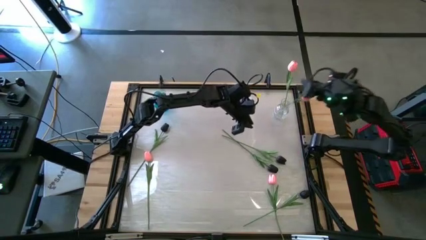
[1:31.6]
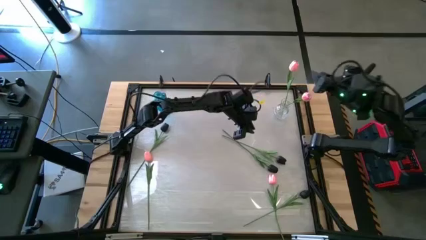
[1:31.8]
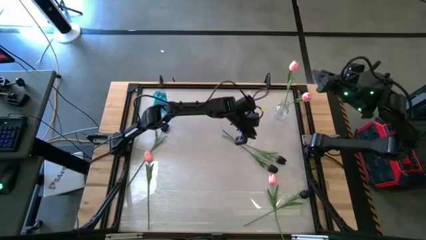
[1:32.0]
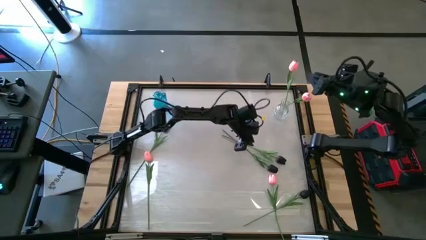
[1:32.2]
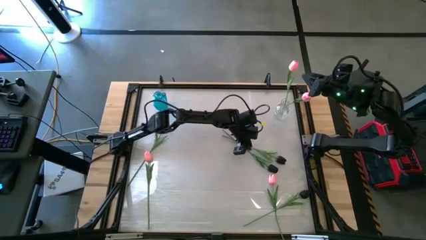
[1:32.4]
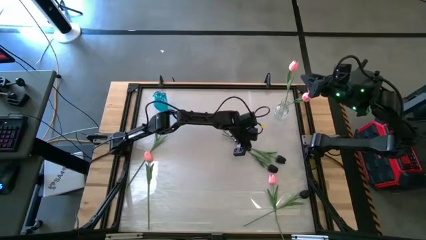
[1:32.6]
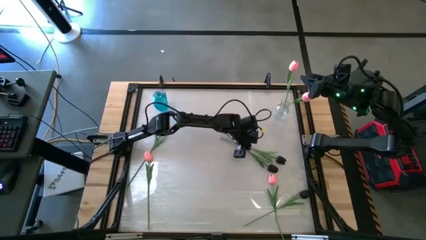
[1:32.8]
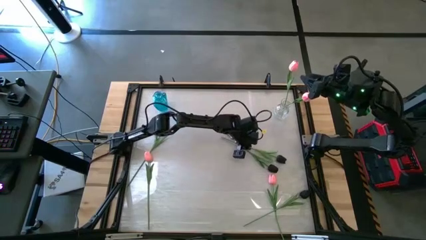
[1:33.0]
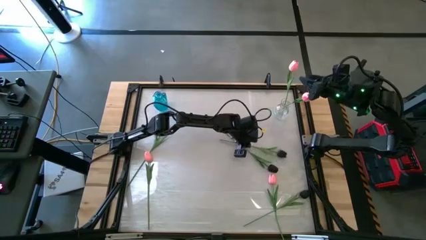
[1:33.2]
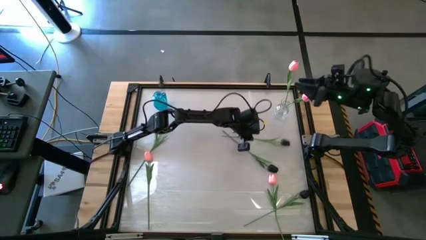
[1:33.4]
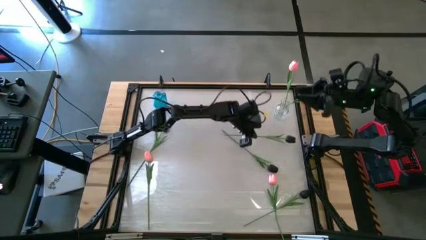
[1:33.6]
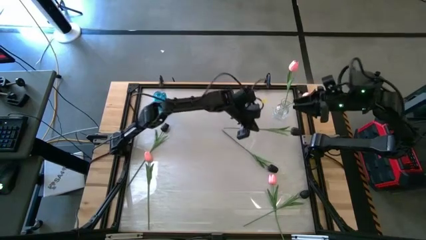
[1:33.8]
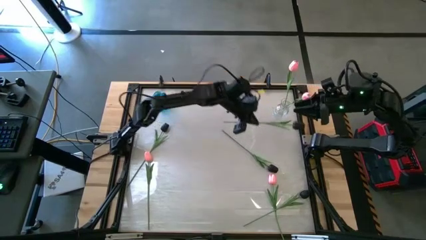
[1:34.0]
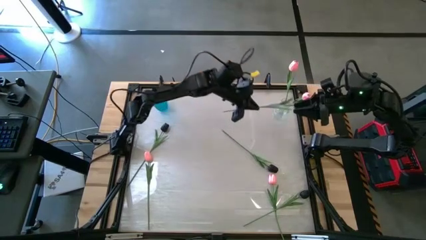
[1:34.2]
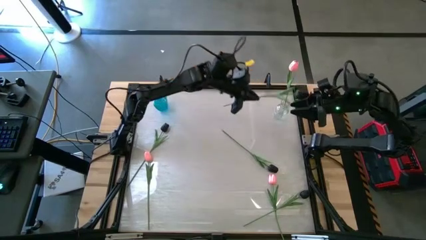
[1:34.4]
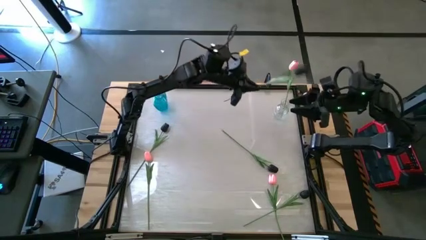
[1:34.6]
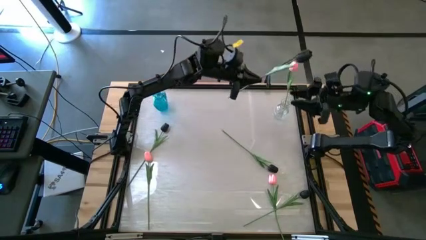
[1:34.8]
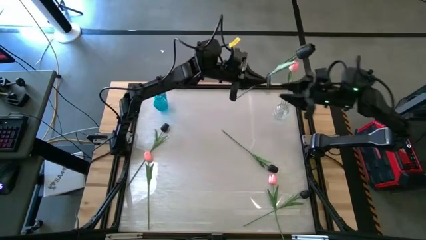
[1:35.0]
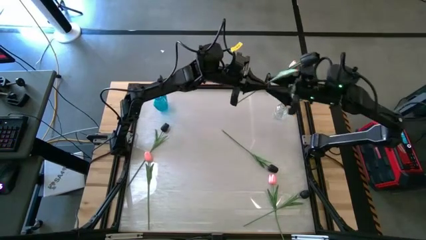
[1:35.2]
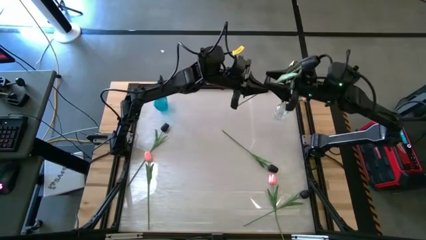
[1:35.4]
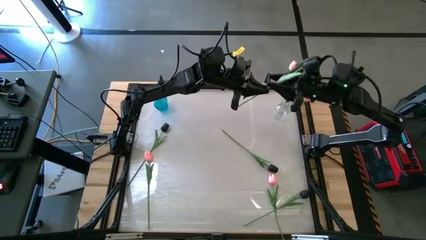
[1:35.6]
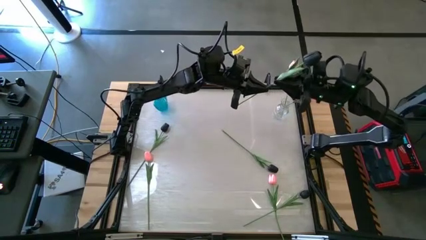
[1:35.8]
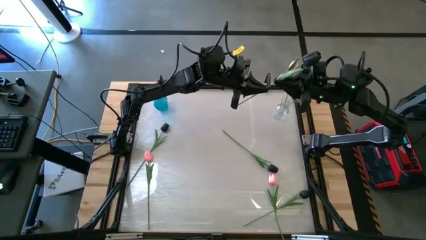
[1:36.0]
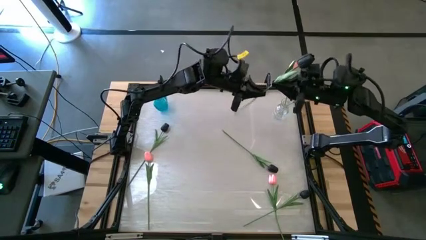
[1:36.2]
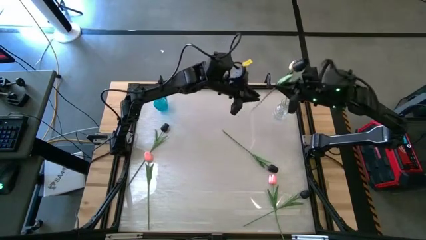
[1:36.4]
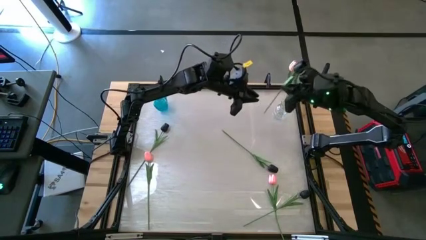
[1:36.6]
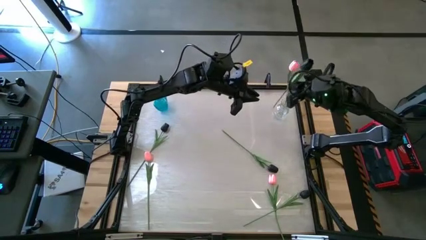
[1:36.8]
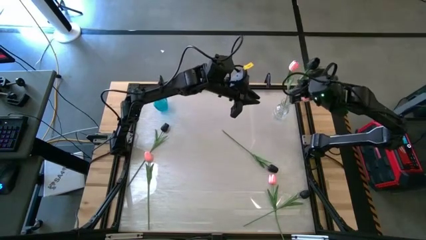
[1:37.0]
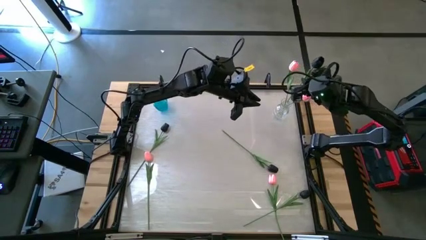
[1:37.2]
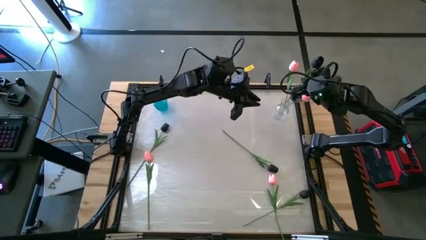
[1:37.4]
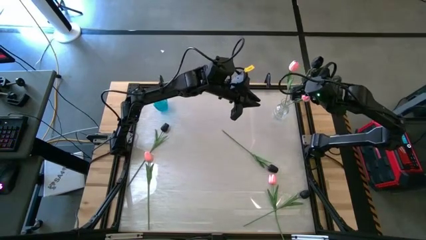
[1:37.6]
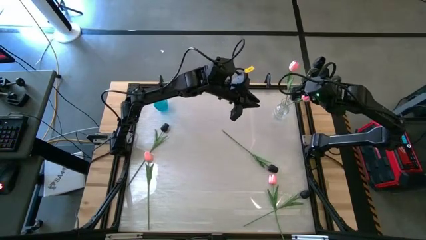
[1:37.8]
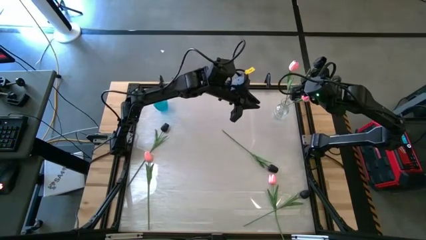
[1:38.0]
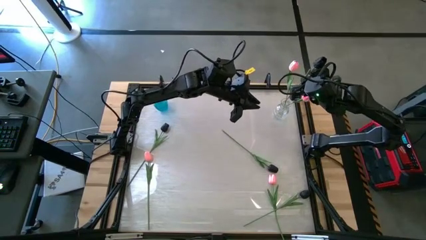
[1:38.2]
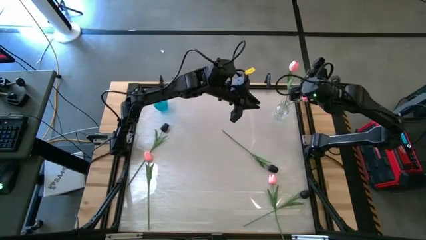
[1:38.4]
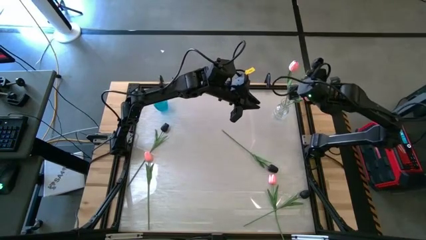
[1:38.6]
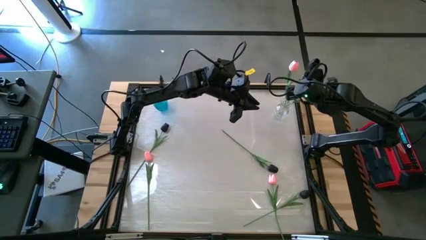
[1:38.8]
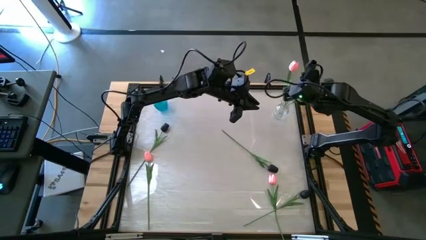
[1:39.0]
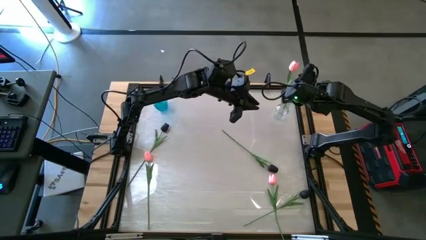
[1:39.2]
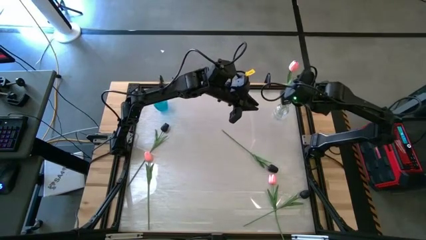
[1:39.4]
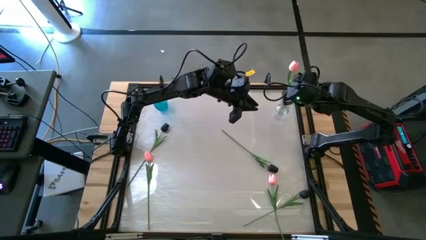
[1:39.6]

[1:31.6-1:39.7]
Task: Sort flowers into vase by color
Put the black flower into the transparent vase

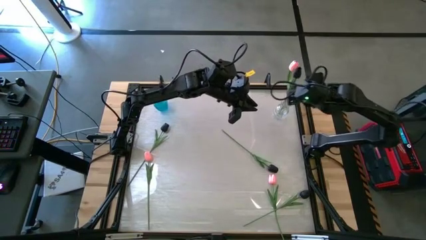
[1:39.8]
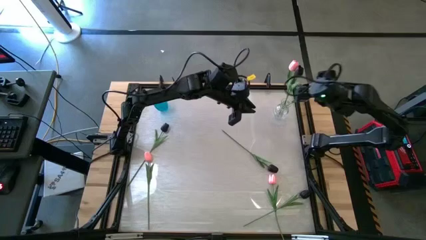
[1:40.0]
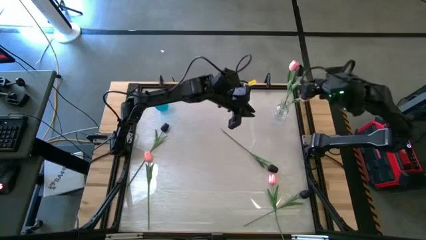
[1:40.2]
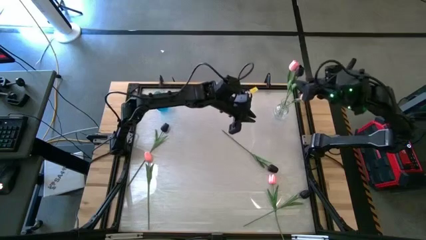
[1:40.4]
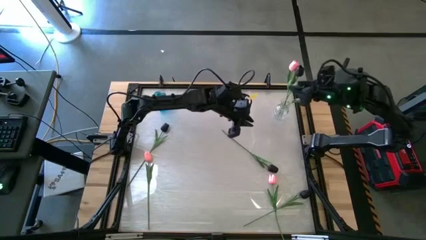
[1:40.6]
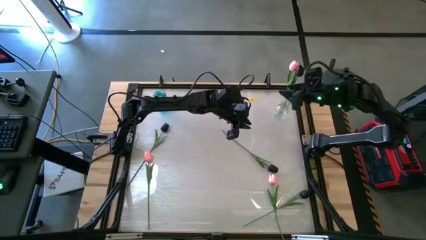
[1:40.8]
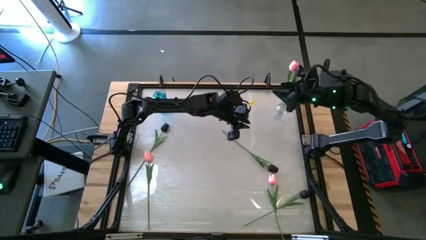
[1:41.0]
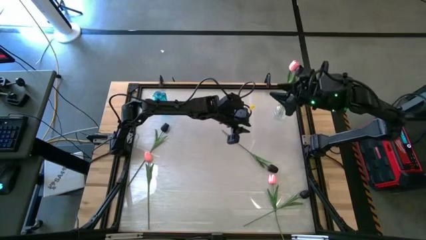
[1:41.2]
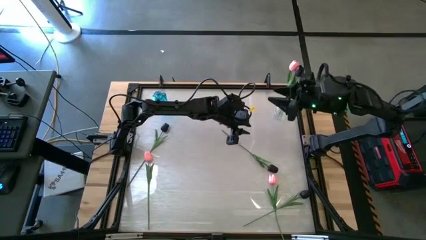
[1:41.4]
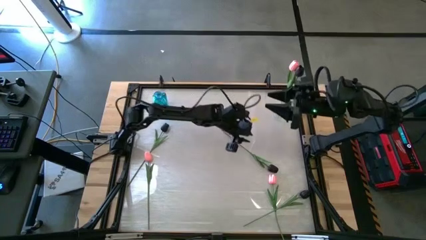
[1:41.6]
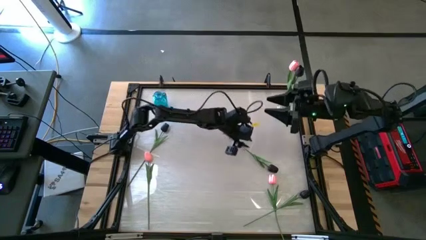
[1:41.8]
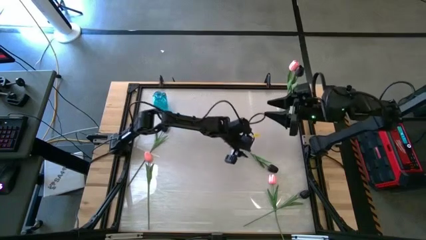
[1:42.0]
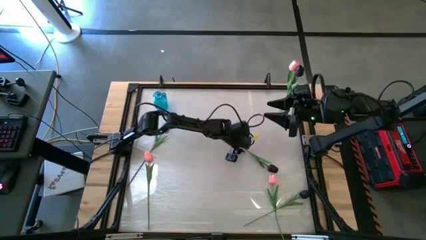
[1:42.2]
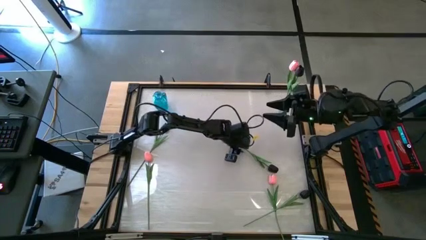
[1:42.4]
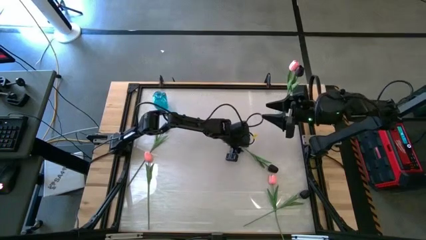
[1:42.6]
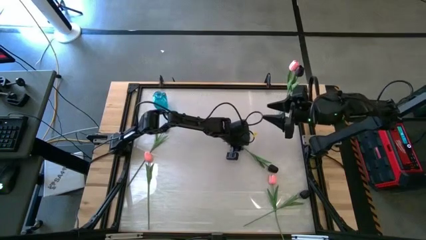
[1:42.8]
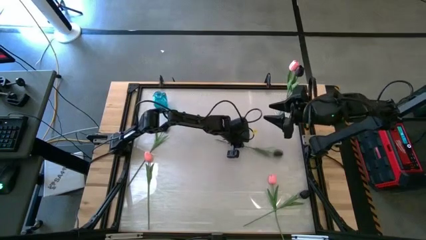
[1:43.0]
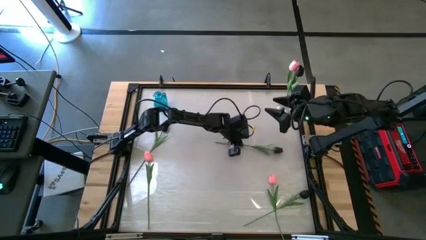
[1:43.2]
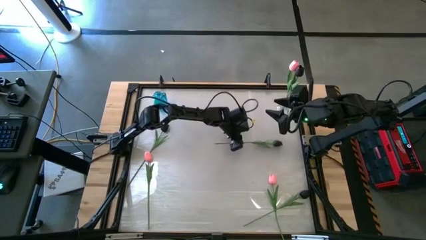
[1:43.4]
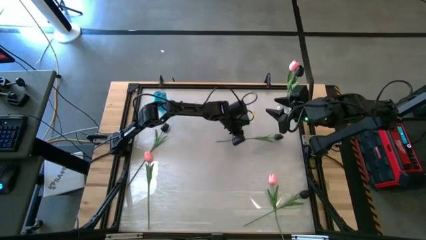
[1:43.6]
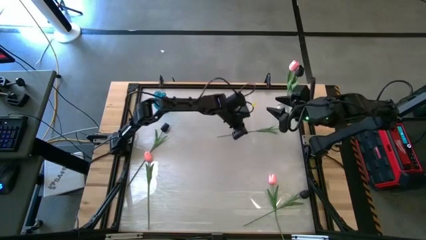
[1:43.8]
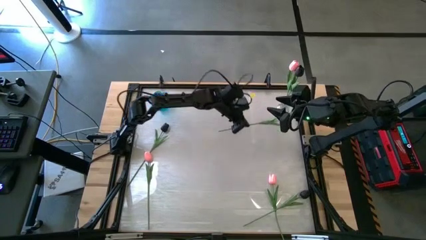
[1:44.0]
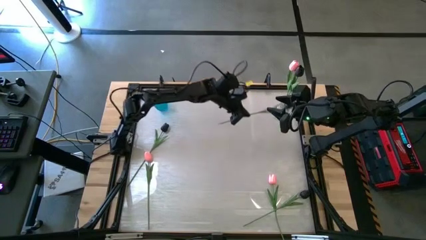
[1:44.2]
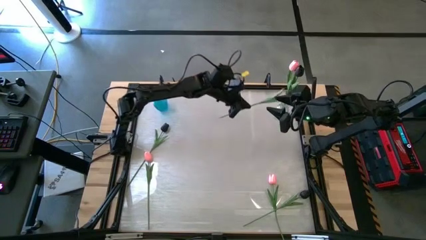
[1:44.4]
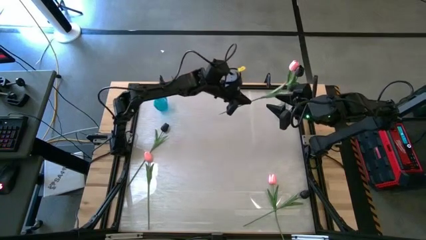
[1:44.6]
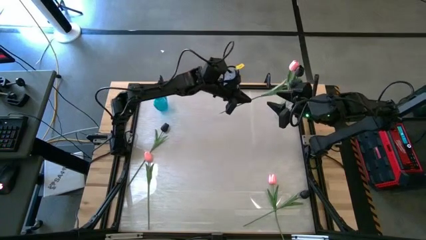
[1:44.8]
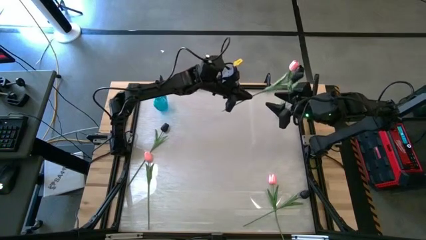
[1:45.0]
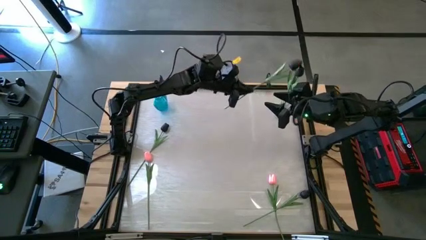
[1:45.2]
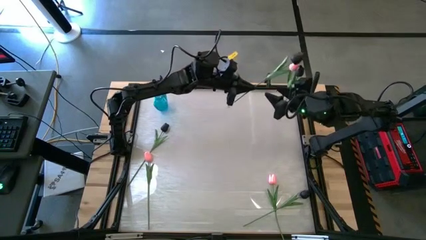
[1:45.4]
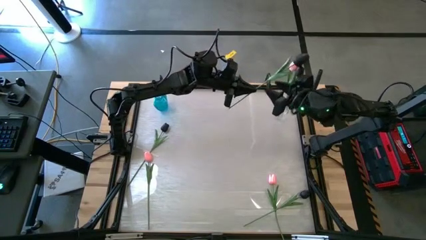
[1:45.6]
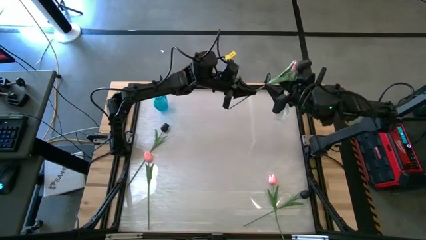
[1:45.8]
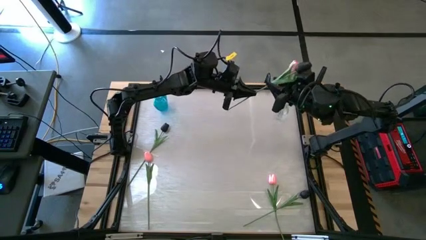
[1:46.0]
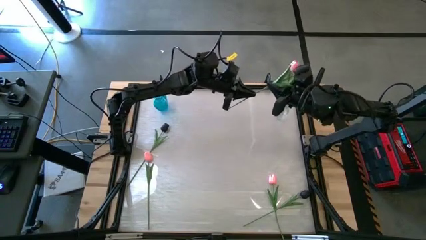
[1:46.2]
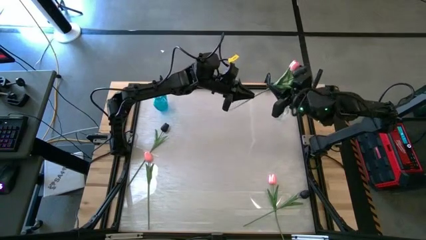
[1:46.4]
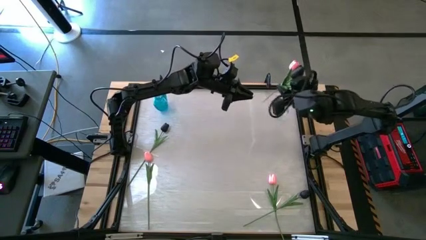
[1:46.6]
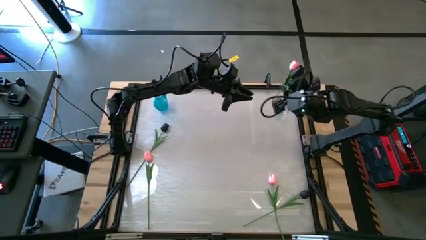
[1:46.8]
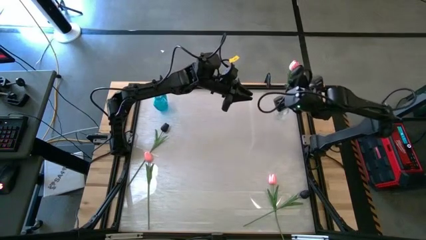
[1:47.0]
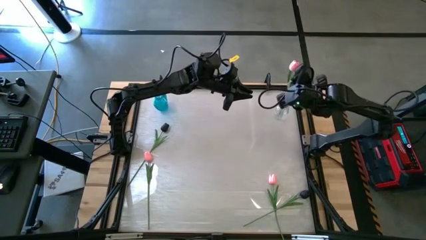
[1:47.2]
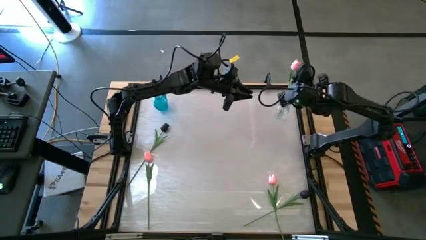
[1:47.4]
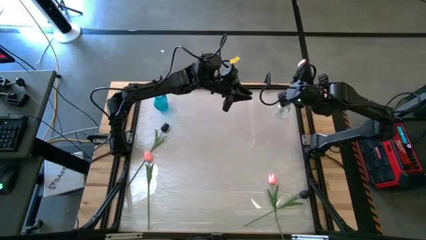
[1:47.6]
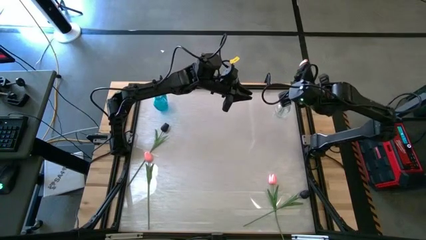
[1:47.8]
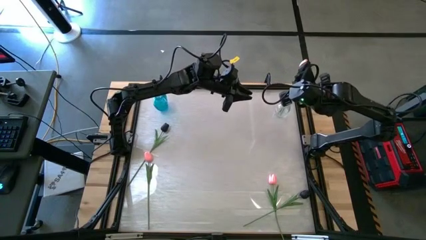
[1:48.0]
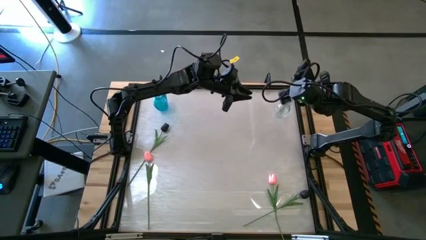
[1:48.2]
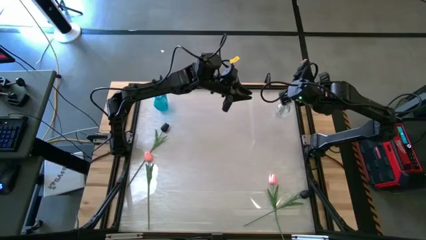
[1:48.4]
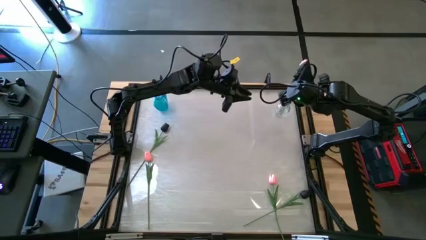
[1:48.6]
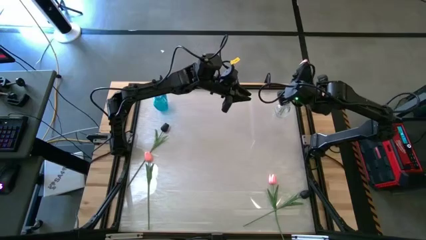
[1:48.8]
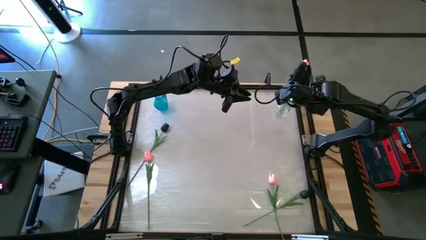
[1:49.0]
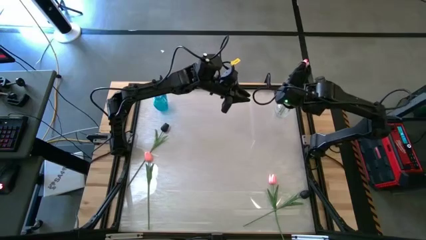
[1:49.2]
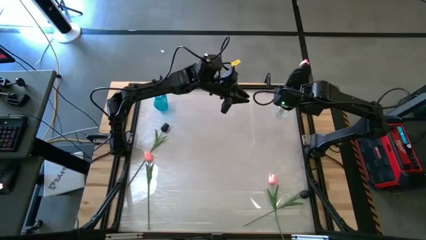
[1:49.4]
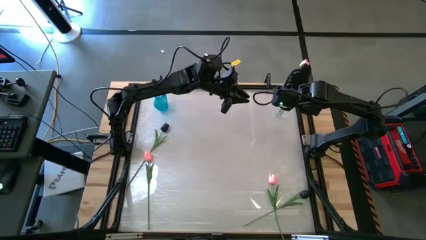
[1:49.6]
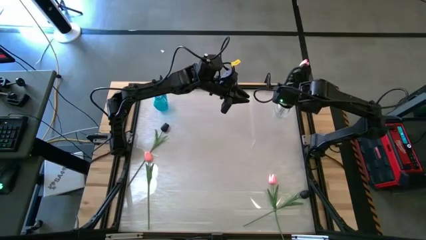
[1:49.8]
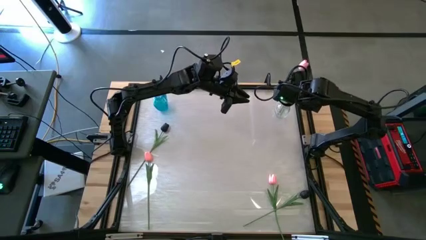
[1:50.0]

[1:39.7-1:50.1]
Put the black flower into the transparent vase
